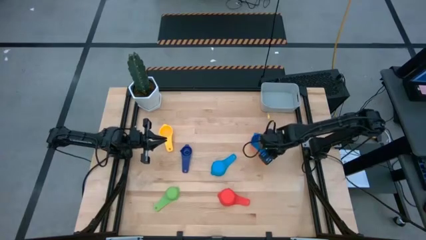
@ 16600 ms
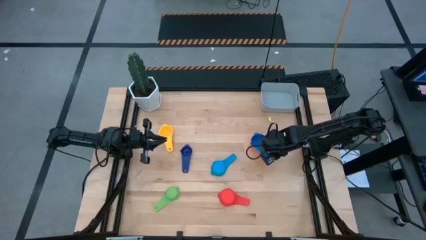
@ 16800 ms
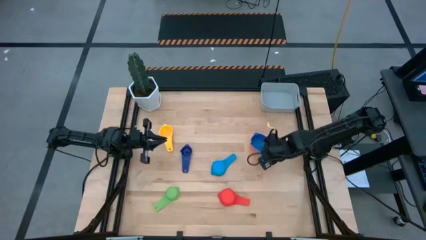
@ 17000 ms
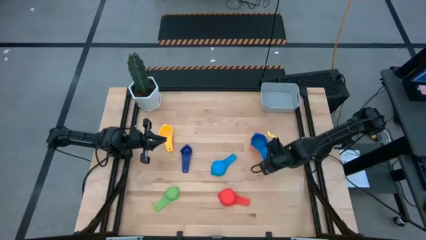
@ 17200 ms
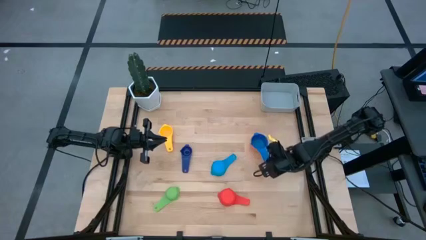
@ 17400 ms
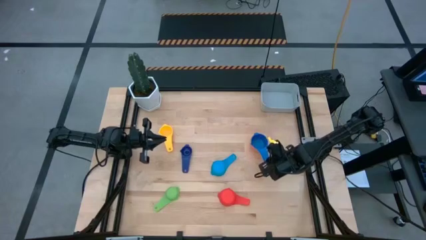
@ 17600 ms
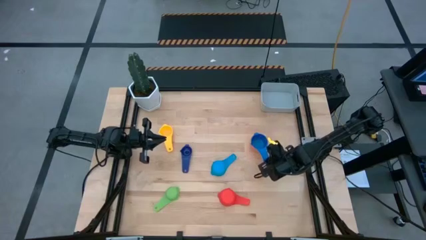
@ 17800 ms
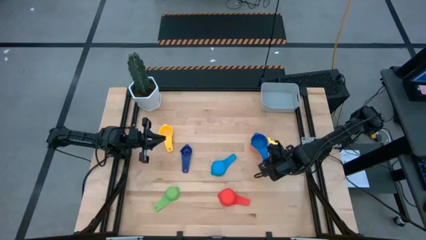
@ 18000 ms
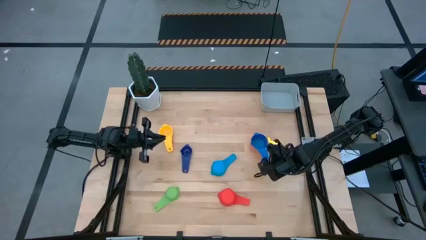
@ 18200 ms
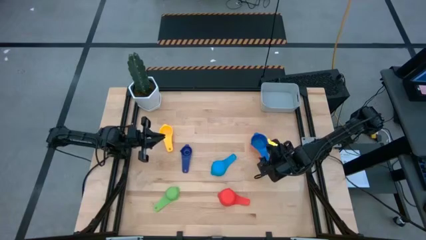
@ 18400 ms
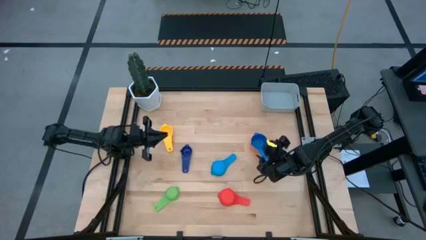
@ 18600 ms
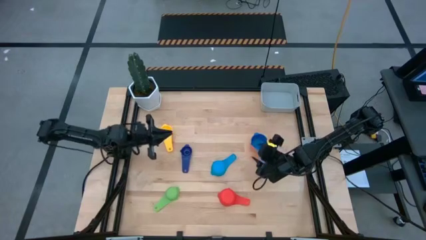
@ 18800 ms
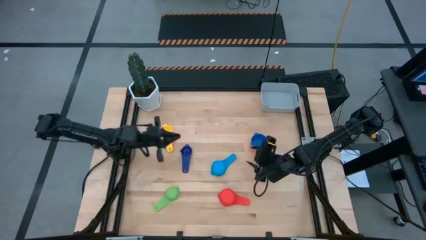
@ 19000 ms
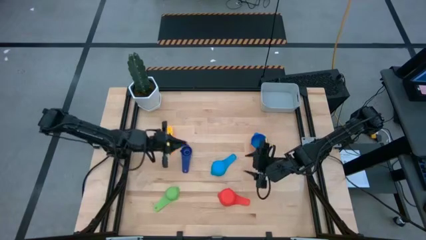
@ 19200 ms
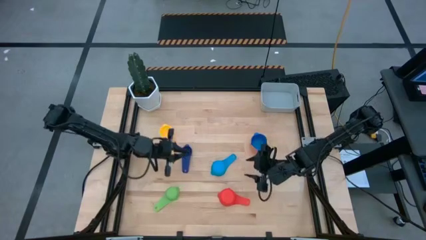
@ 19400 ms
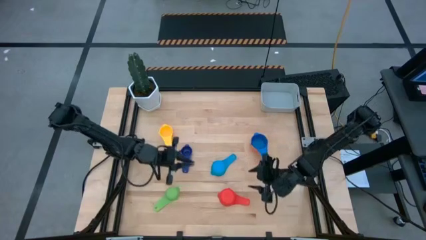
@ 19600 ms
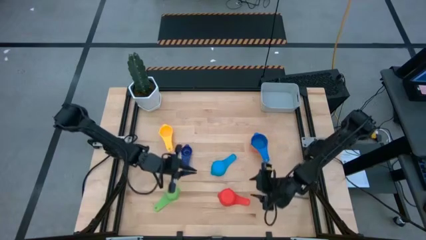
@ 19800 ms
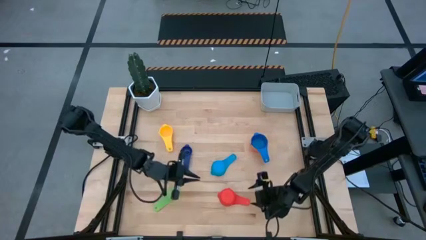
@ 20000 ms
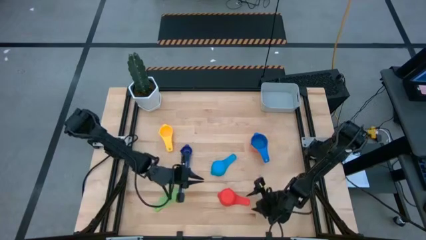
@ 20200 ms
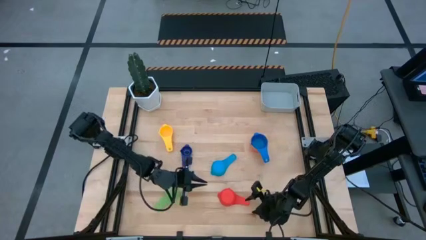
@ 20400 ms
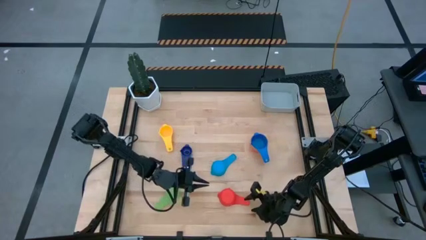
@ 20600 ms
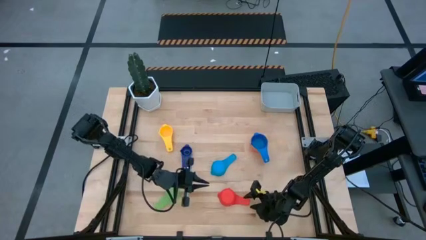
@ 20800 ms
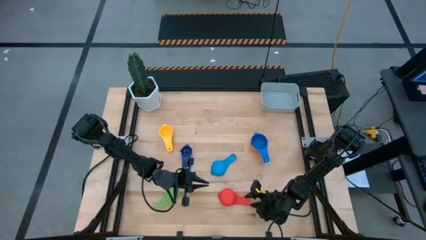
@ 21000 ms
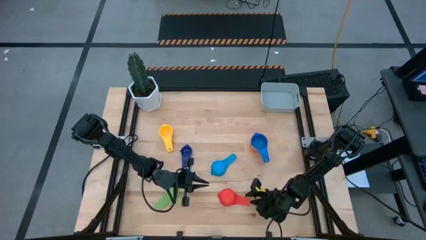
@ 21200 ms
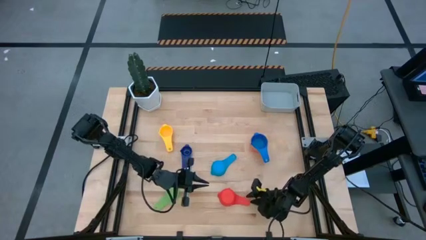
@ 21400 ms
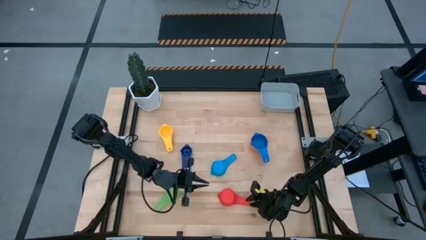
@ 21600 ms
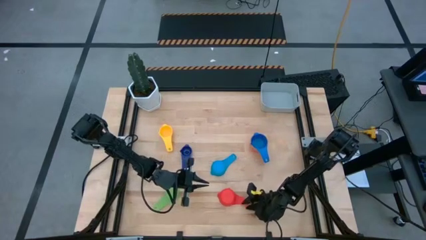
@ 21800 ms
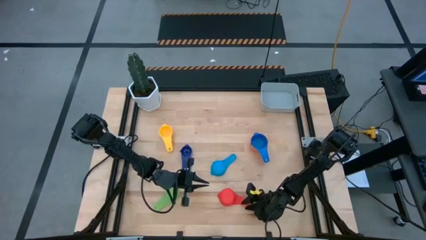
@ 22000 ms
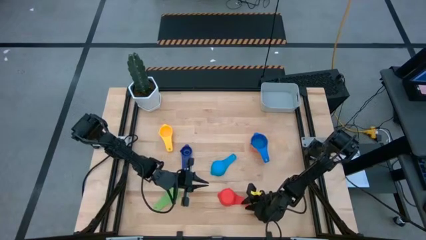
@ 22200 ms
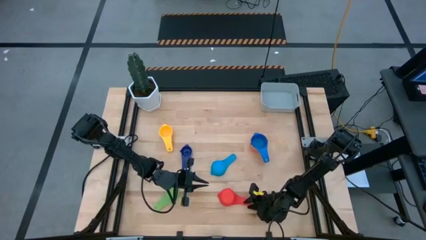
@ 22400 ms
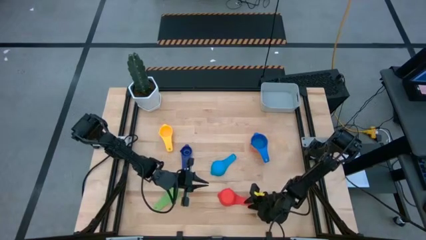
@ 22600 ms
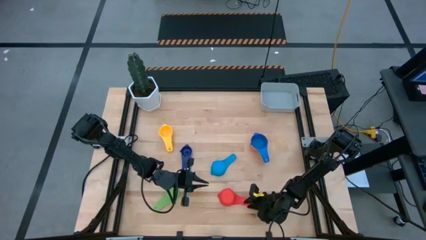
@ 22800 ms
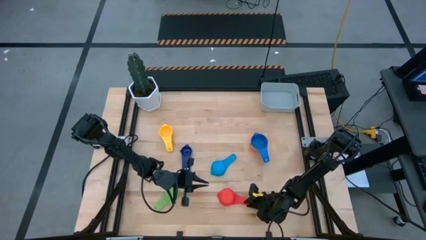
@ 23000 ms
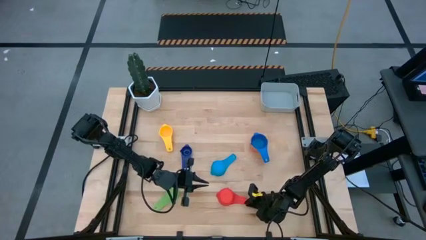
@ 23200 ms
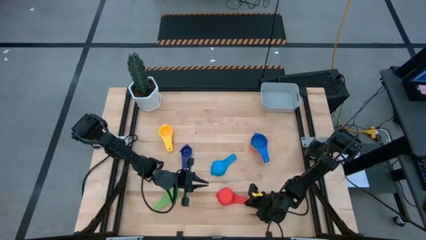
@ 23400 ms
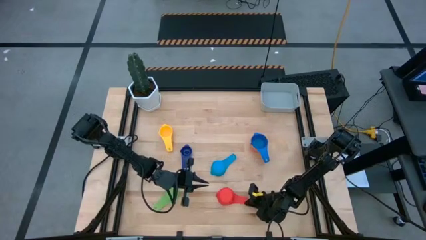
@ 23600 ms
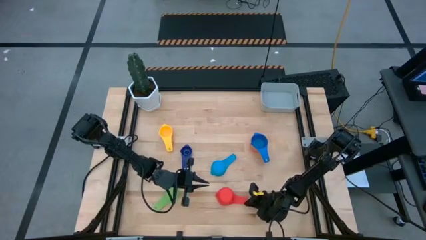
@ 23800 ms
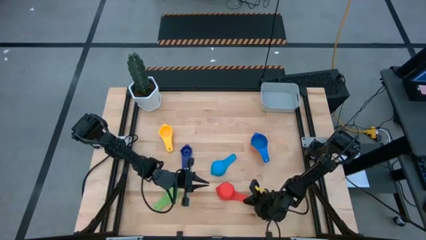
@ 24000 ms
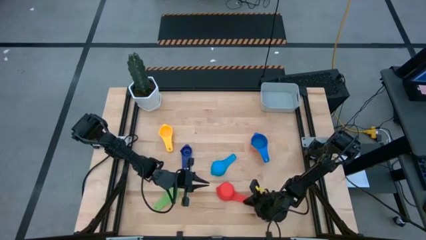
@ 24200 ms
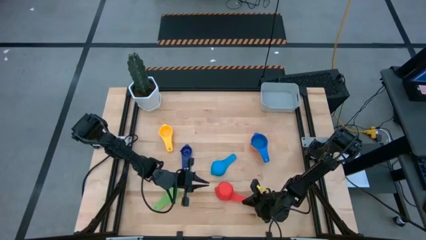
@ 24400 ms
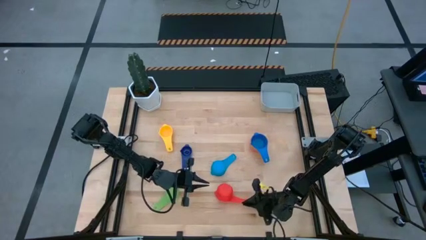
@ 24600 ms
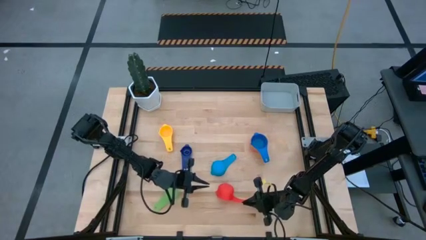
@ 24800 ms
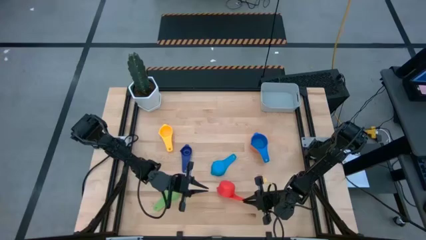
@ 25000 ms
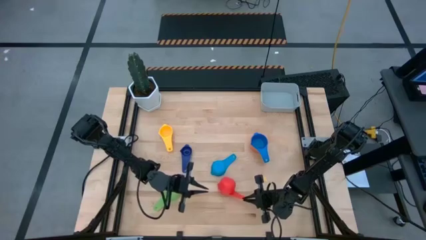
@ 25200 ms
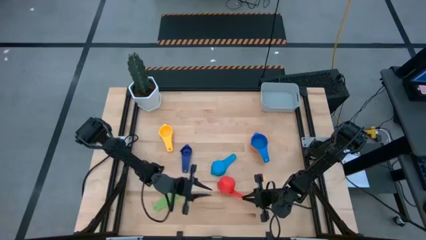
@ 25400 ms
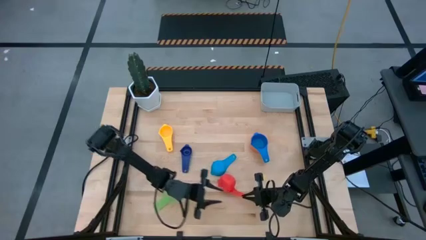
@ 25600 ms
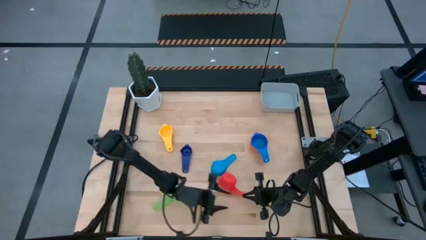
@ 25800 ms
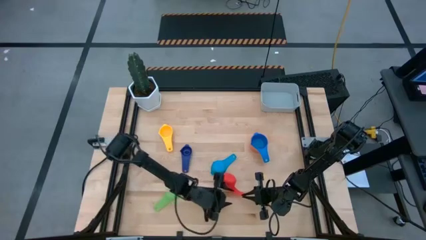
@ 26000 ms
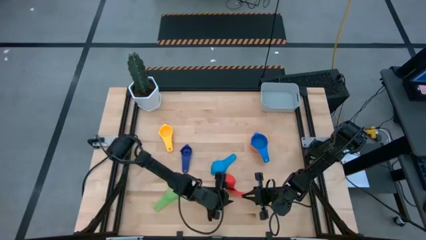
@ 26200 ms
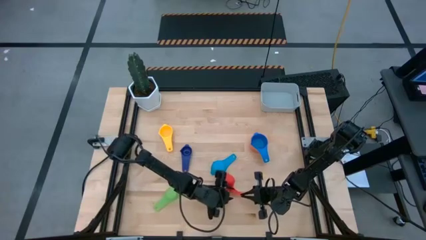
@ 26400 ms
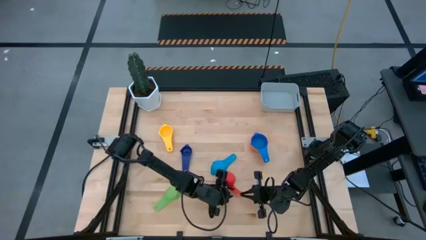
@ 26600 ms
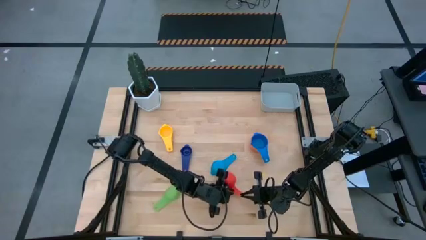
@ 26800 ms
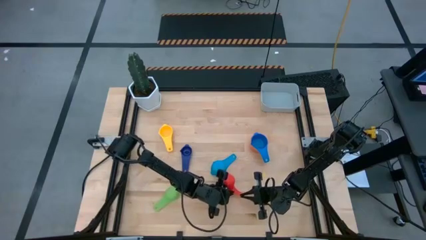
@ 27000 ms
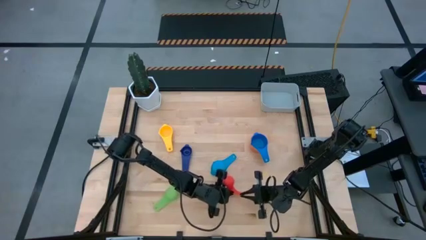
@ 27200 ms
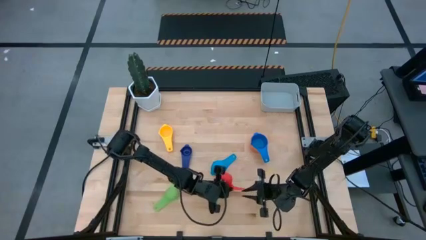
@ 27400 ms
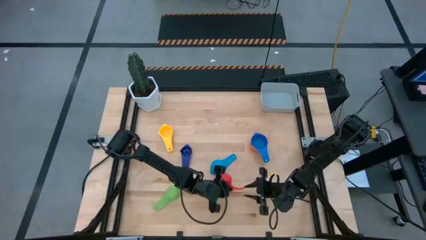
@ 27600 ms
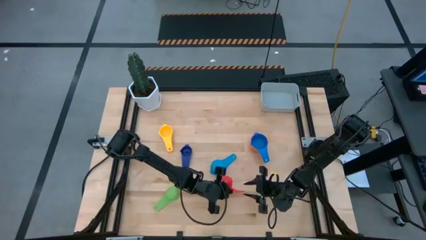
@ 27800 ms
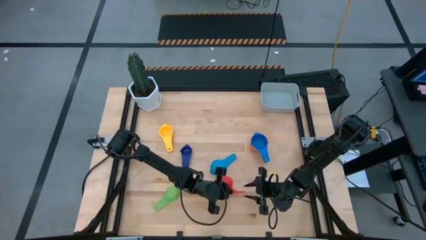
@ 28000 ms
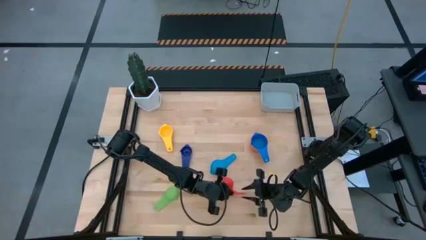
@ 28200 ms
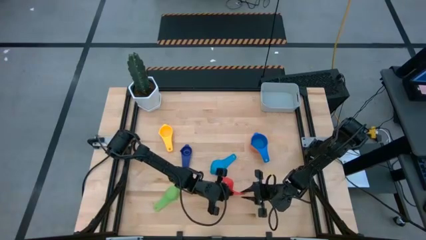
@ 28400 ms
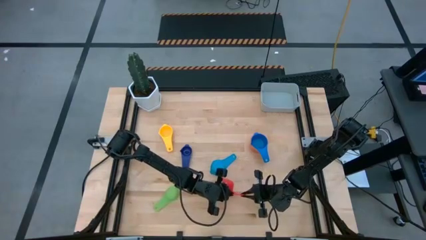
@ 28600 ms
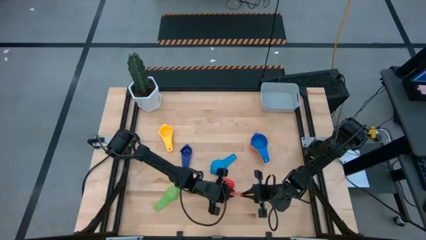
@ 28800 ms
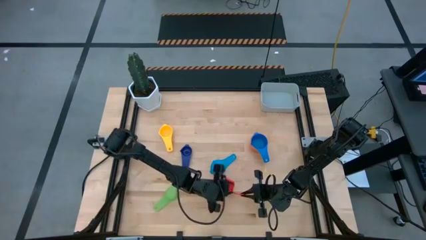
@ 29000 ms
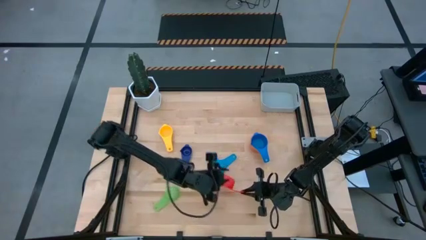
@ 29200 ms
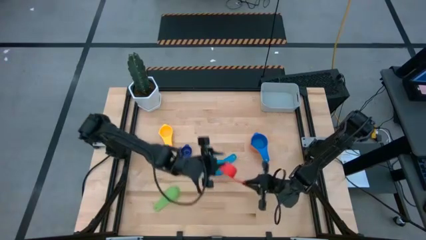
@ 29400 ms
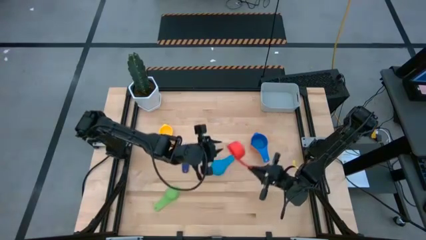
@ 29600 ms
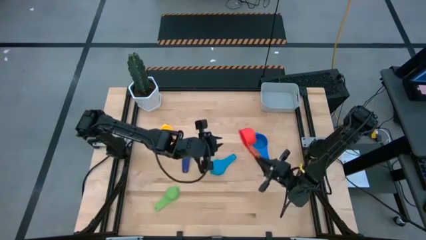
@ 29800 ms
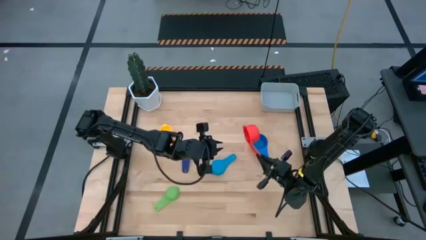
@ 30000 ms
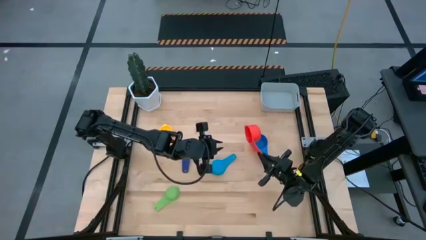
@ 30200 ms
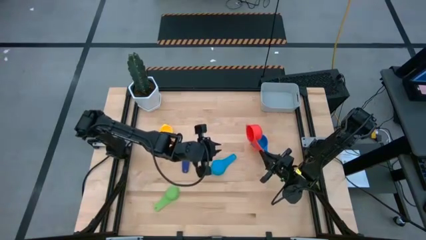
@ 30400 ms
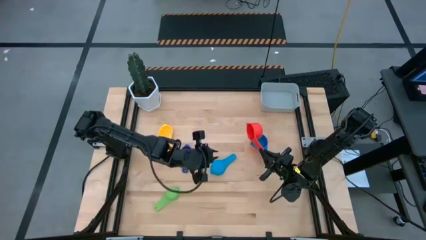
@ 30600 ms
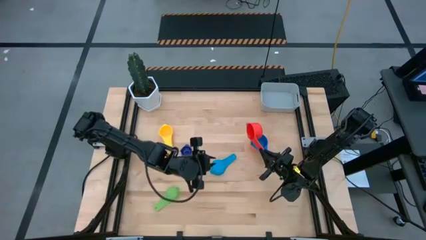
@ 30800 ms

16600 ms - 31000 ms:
Task: Nest measuring cups in basket
Stack the red measuring cup on top of the blue measuring cup
